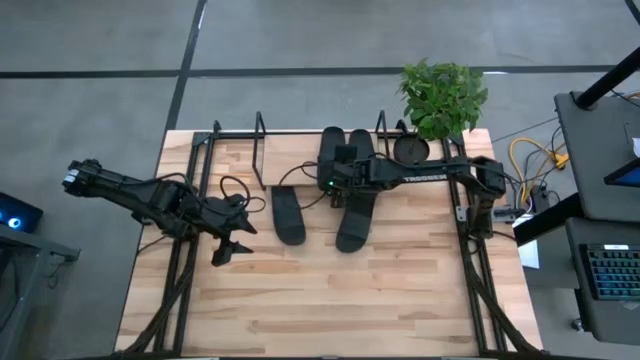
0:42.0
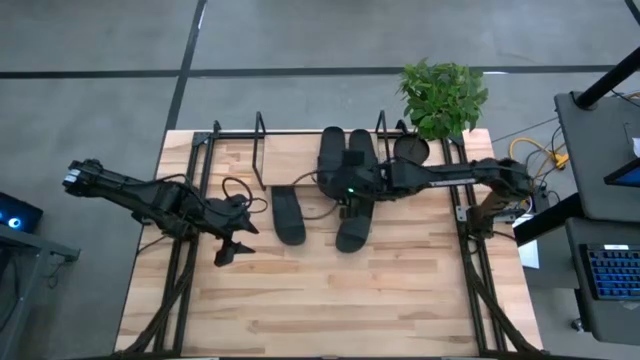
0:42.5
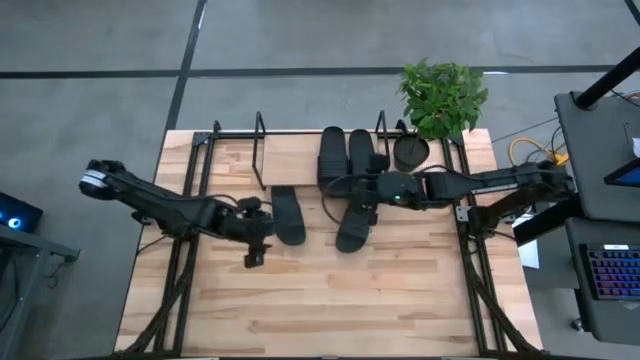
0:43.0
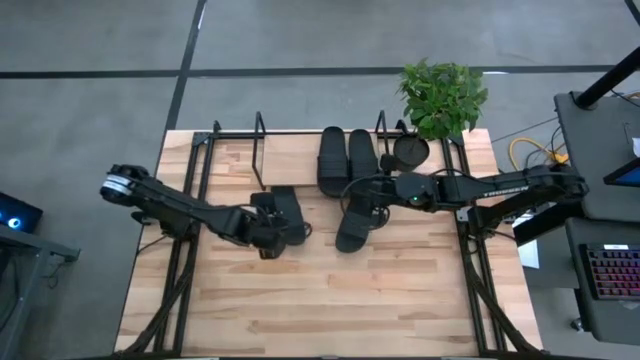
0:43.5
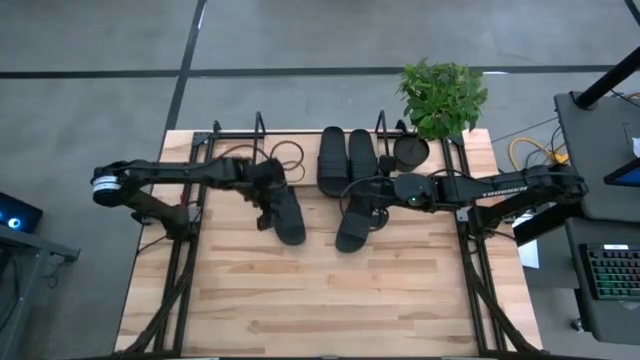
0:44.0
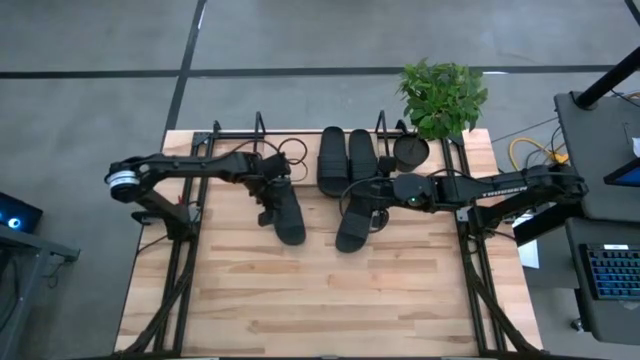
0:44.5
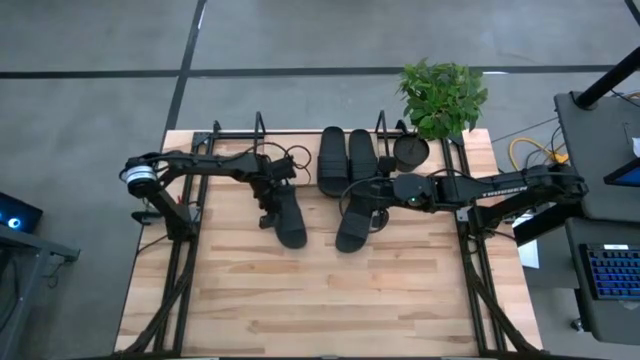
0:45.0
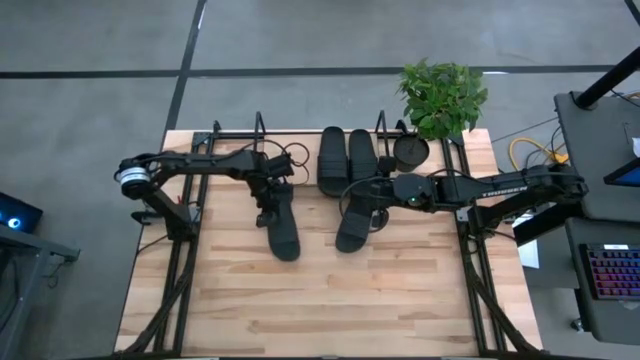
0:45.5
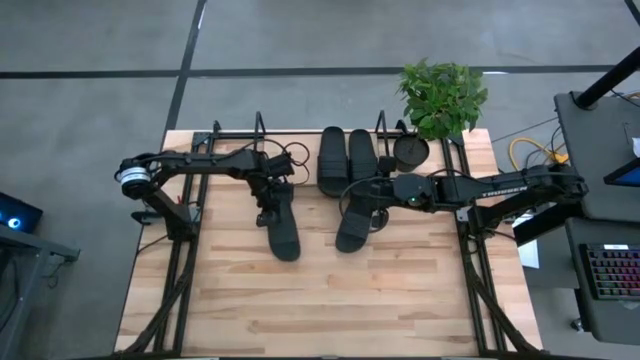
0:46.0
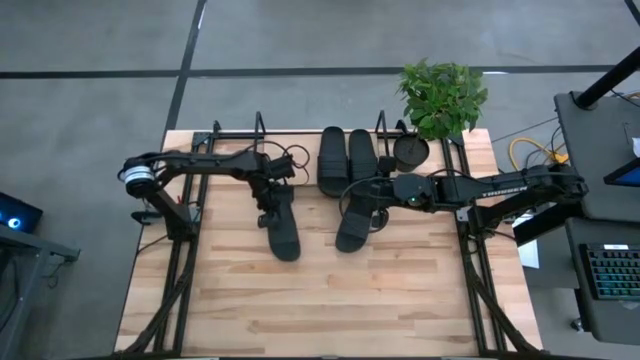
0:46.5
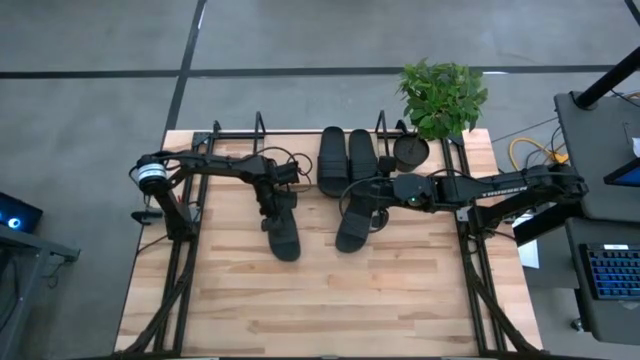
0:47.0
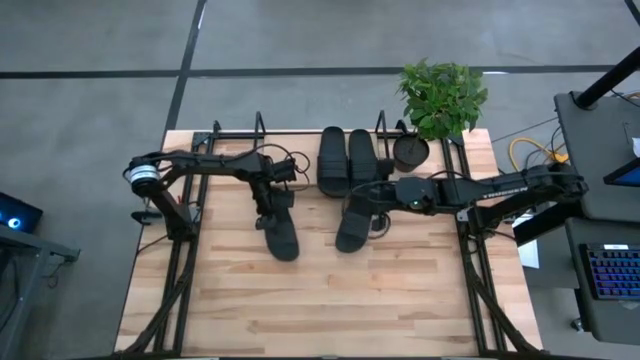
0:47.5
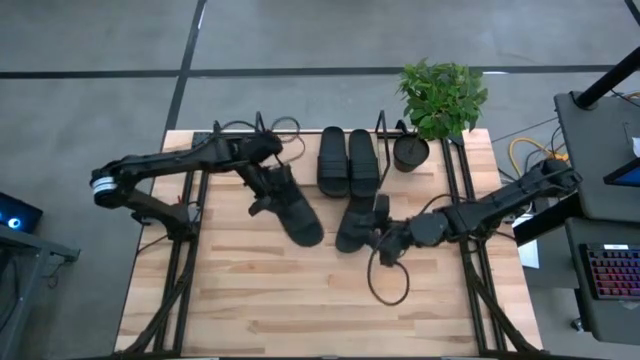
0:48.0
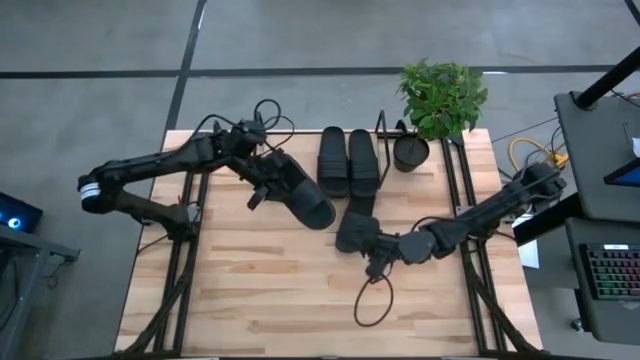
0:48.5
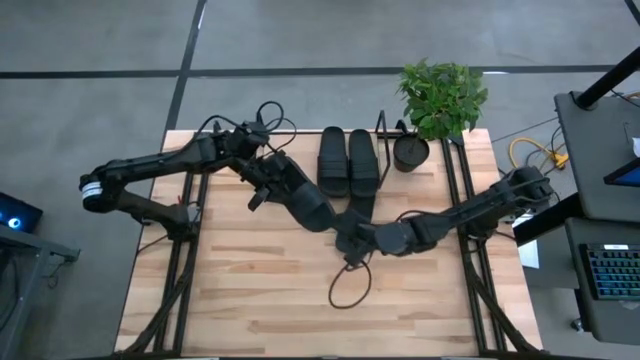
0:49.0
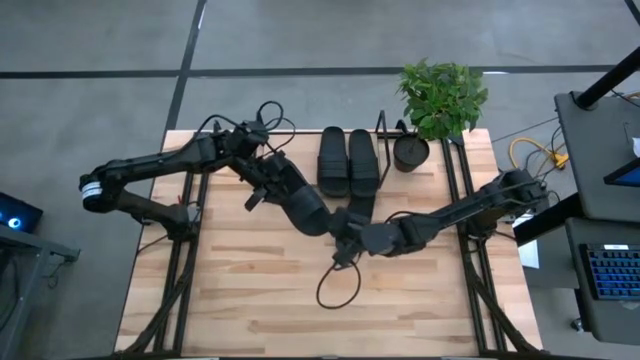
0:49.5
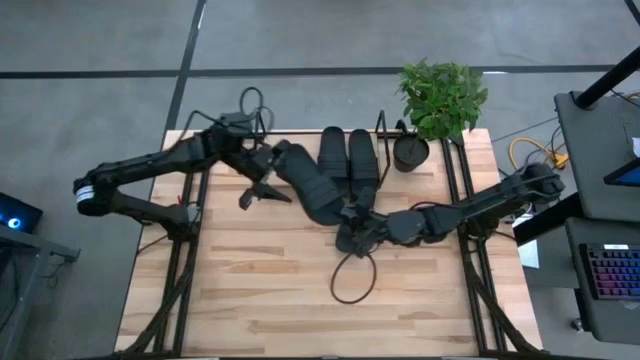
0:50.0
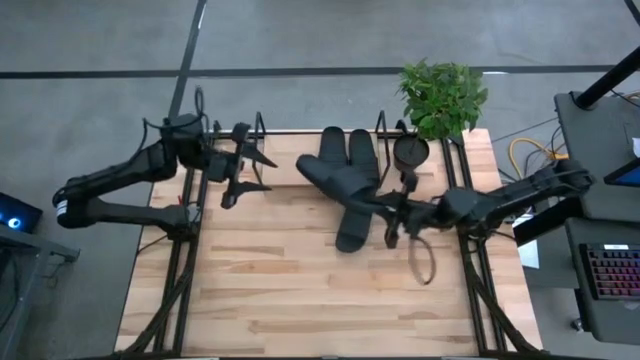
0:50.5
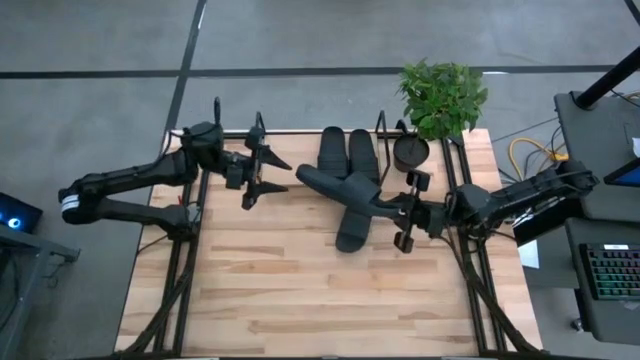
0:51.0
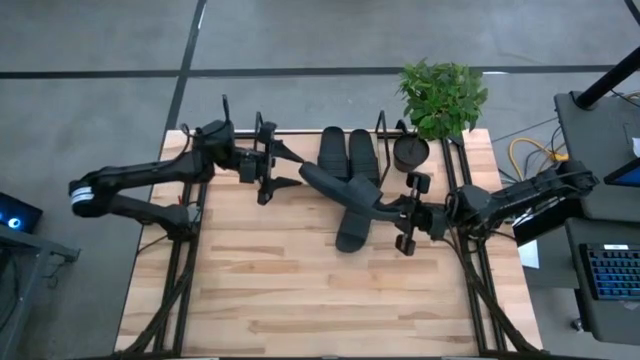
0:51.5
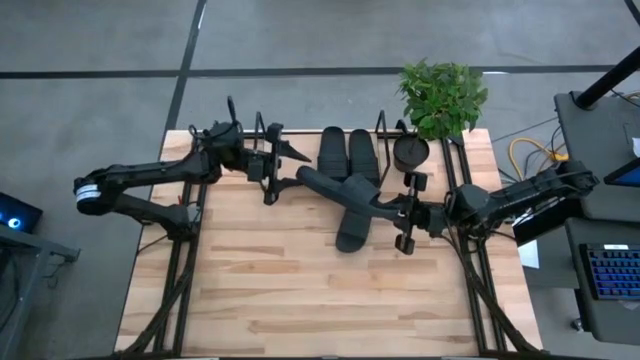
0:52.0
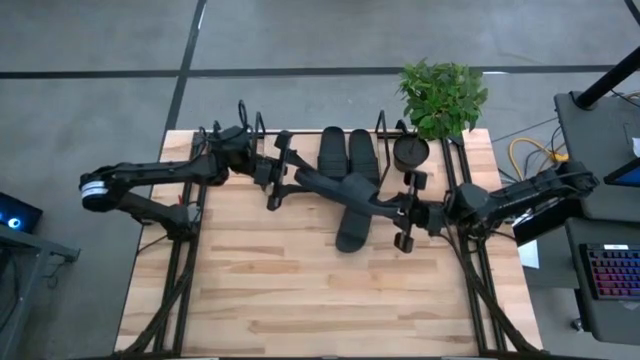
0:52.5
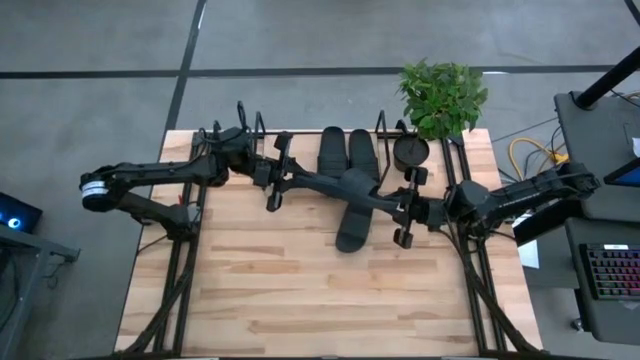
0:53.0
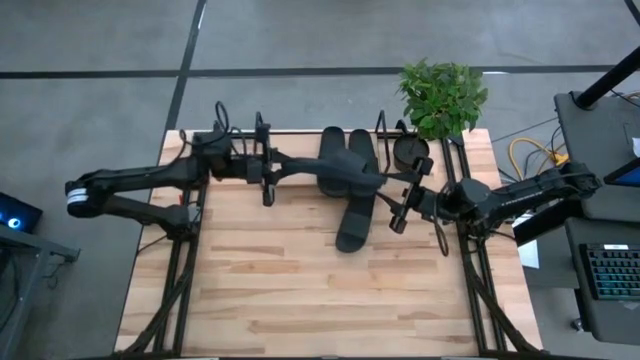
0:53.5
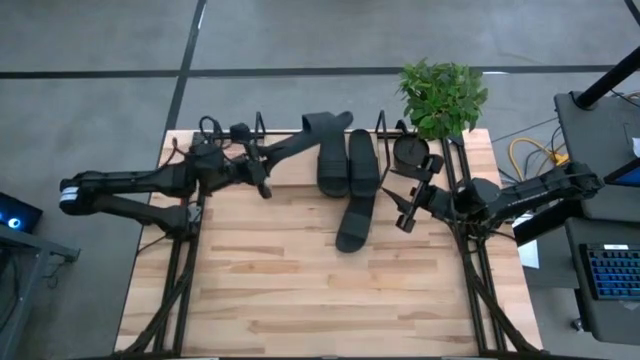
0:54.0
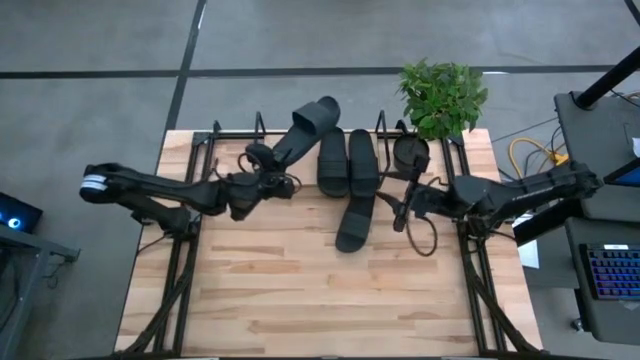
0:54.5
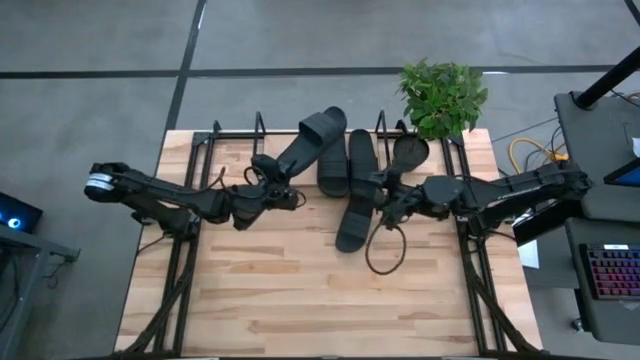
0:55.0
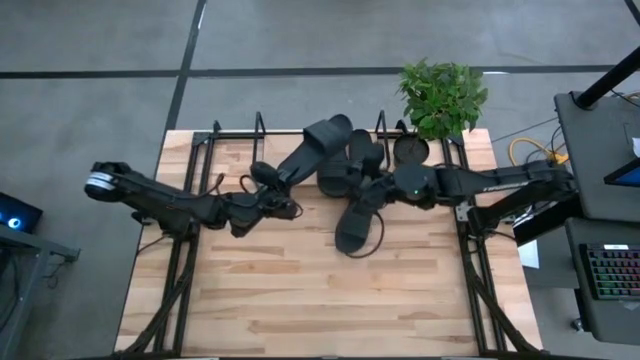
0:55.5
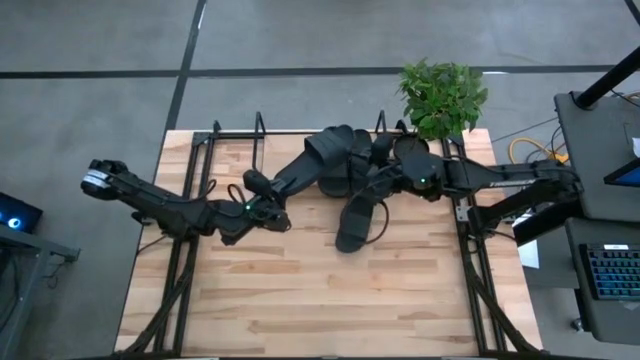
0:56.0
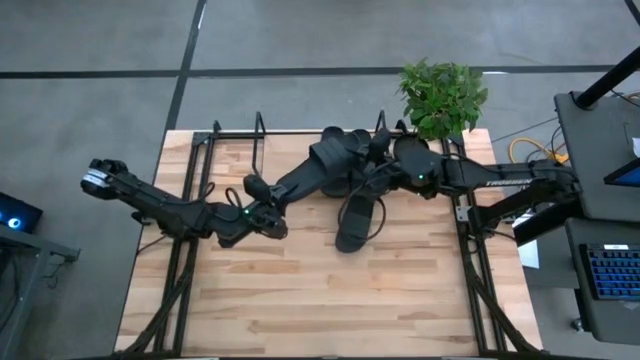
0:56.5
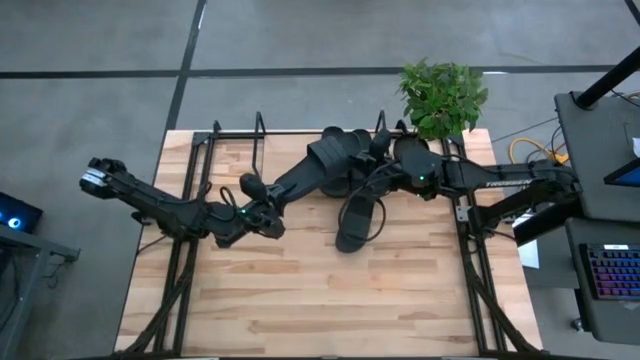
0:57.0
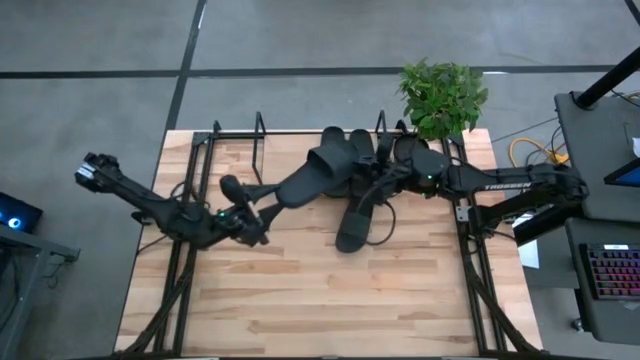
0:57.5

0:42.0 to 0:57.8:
Task: Pick and place slides into the shelf
Put the top left black slides on the shelf
